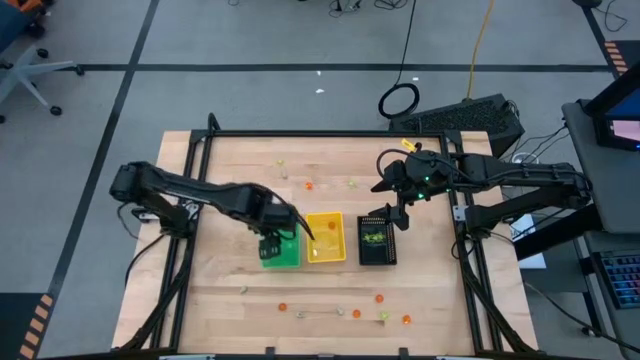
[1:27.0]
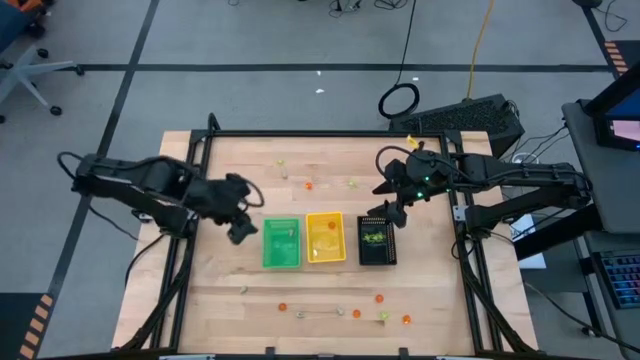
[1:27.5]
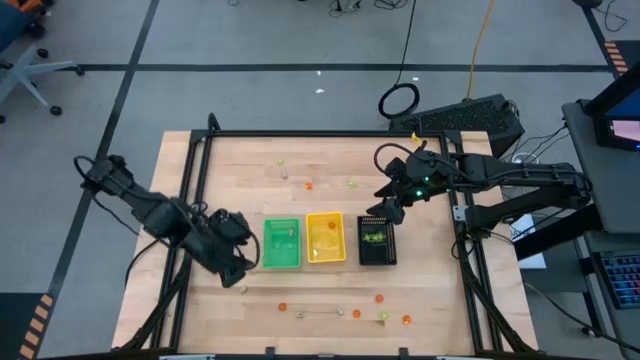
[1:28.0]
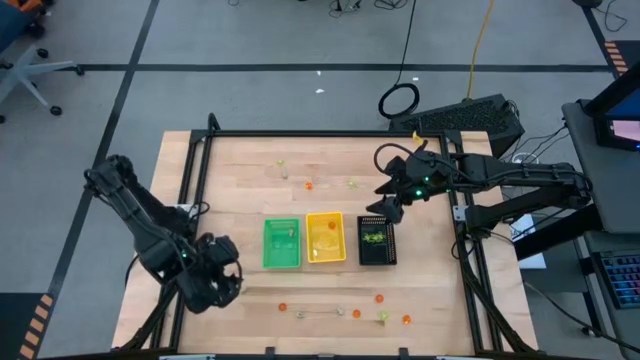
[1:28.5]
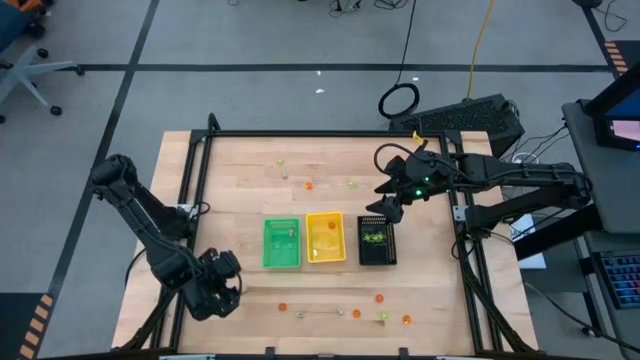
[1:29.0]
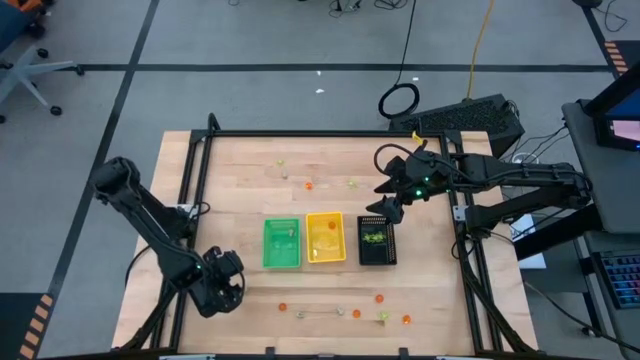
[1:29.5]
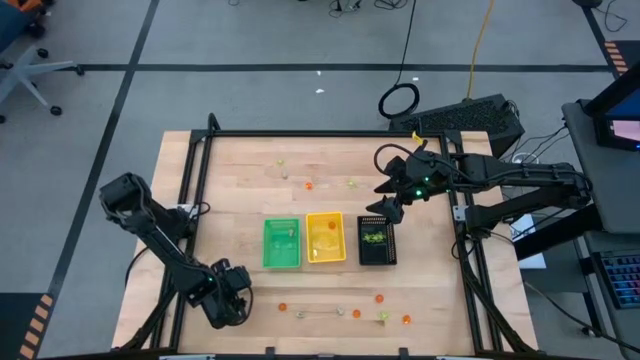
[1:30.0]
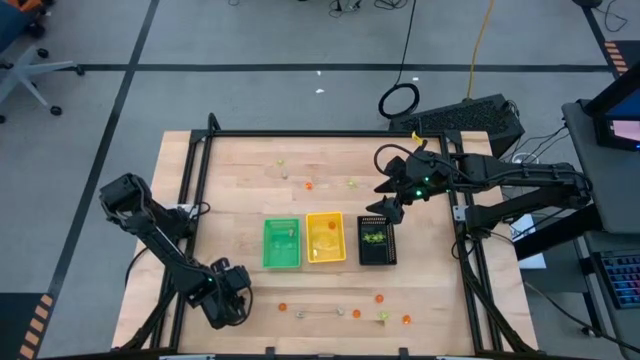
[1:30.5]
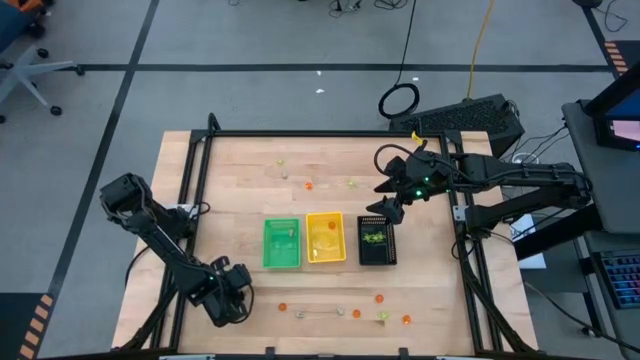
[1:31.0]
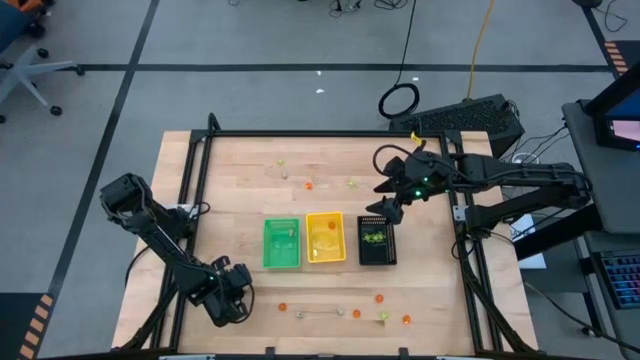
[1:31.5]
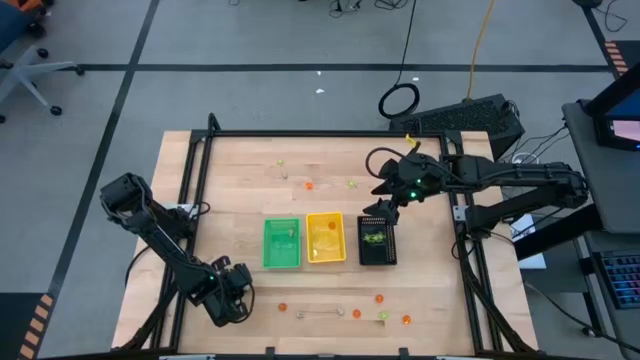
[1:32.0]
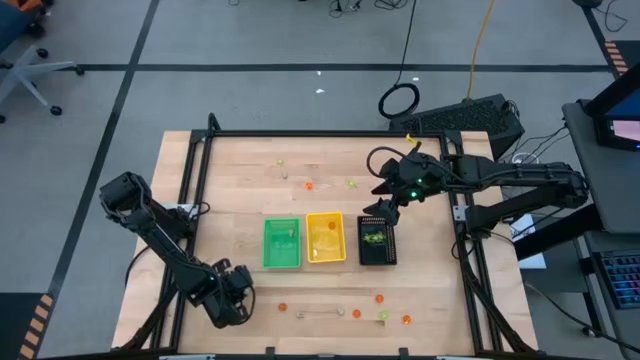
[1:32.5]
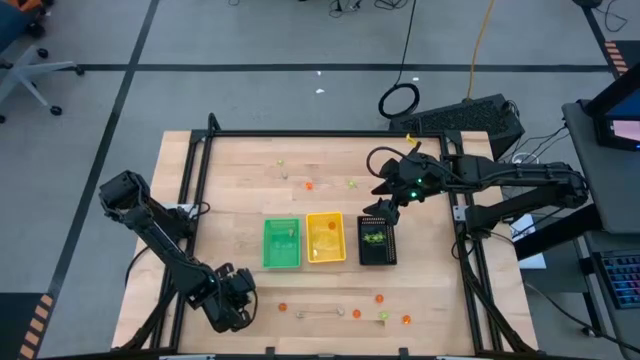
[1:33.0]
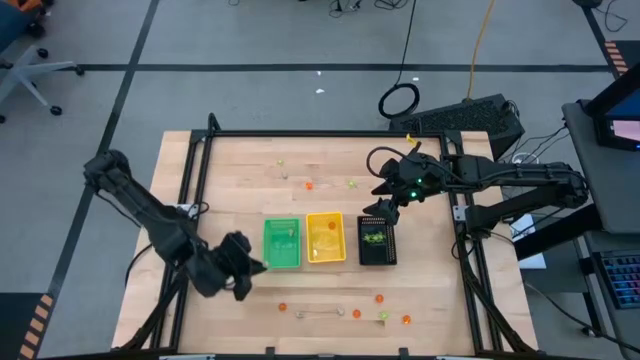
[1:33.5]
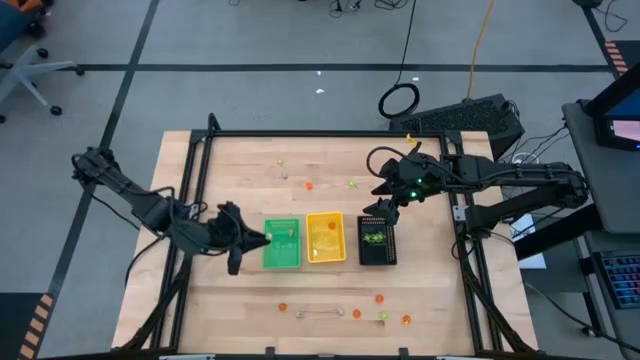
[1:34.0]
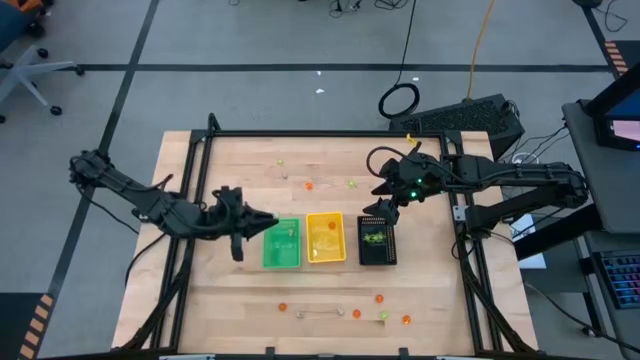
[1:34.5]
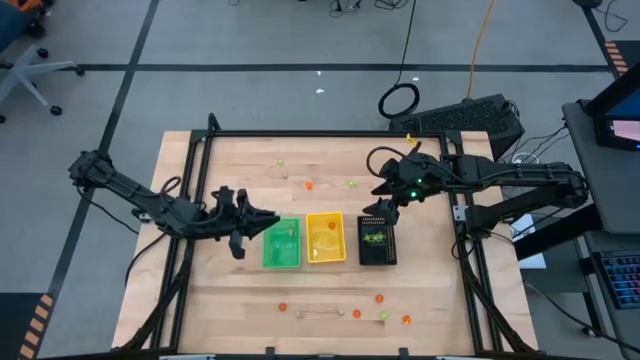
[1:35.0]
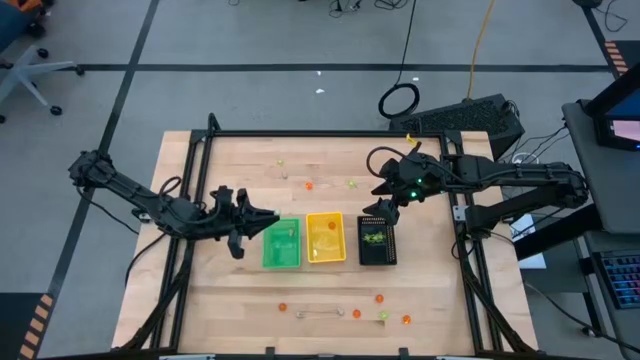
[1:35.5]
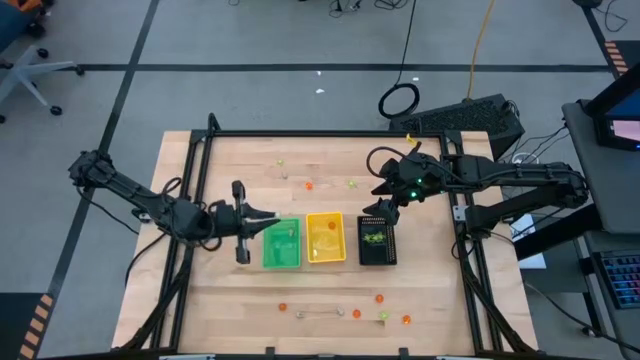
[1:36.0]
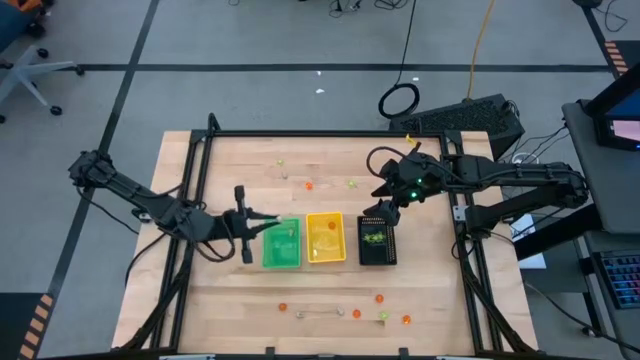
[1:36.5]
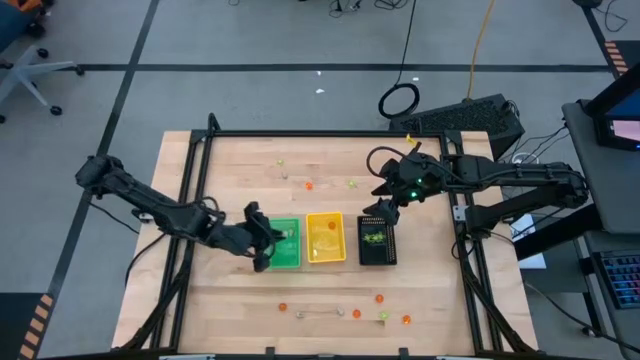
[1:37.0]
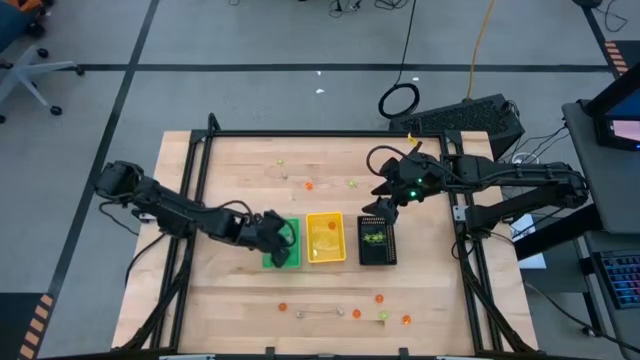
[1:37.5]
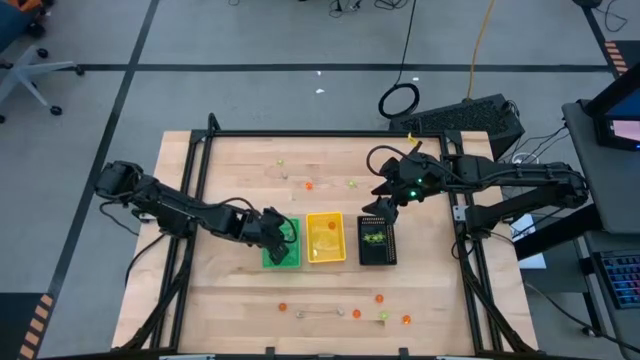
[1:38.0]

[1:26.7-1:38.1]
Task: Sort Halloween decoration
Put the white skull toy into the green basket

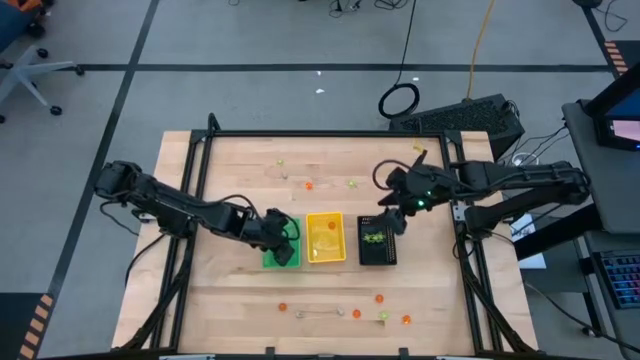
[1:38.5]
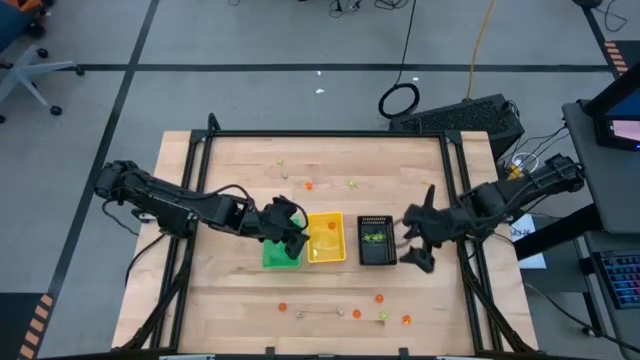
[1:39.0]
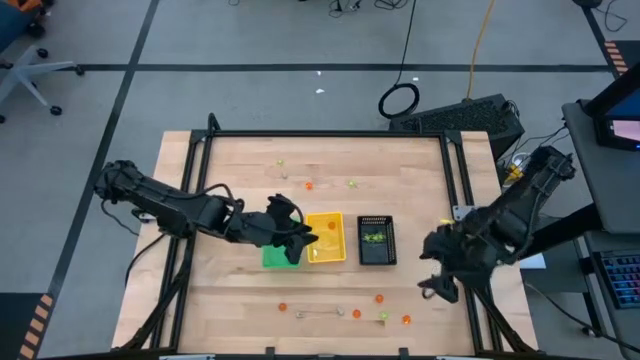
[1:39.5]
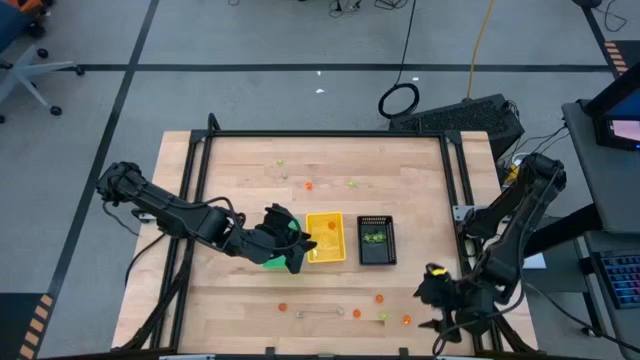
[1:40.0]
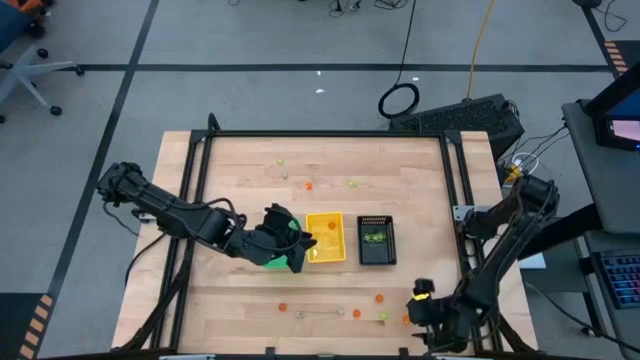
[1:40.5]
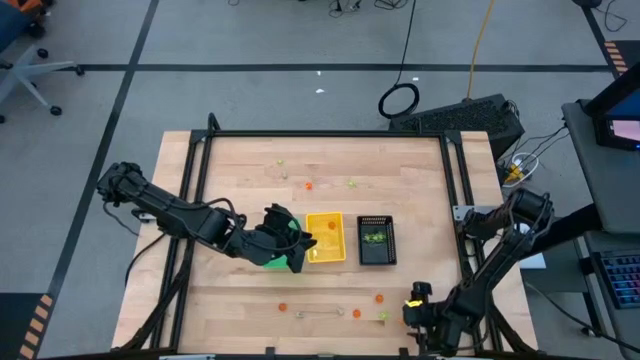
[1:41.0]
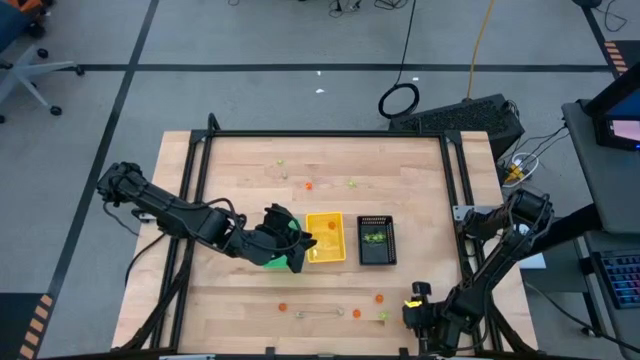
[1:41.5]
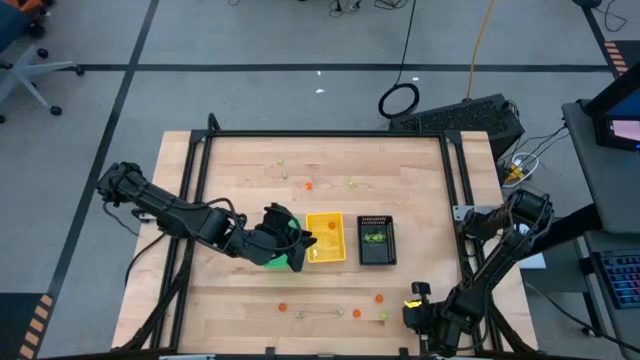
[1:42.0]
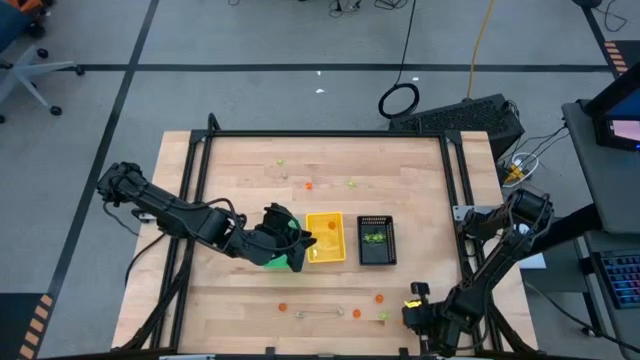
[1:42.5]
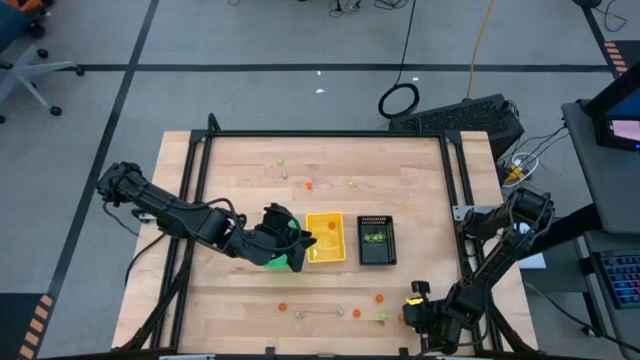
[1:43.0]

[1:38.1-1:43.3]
Put the orange pumpkin toy into the yellow basket
